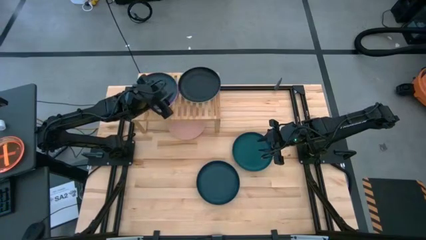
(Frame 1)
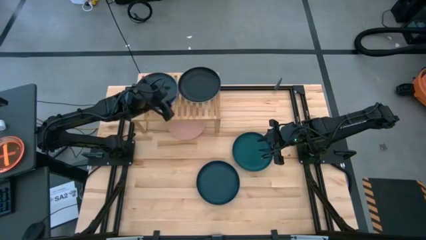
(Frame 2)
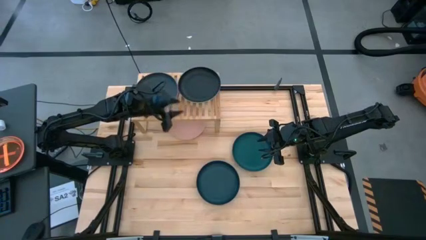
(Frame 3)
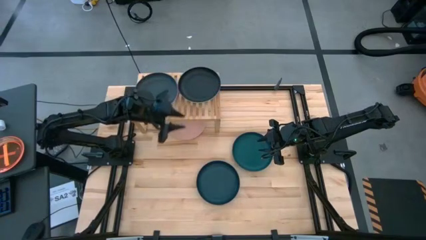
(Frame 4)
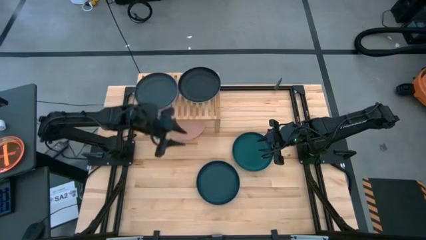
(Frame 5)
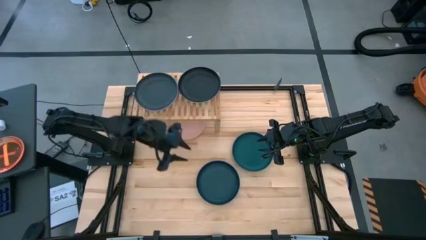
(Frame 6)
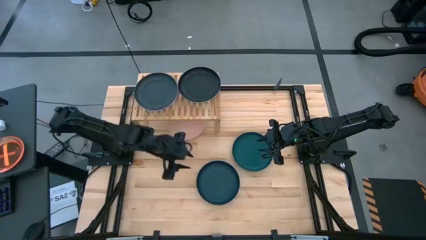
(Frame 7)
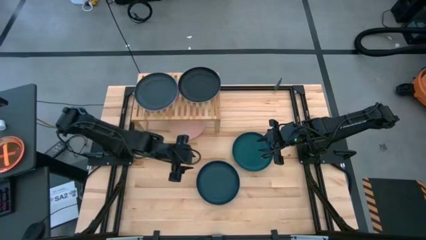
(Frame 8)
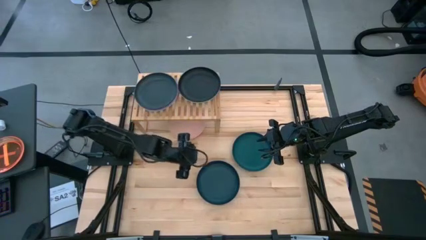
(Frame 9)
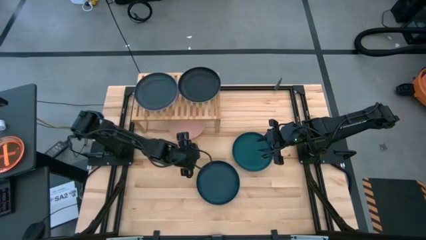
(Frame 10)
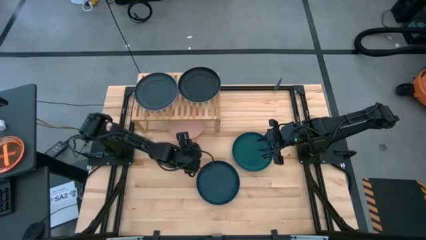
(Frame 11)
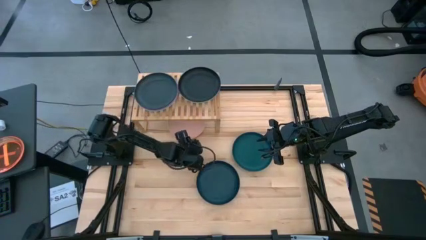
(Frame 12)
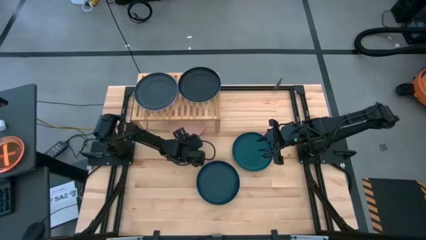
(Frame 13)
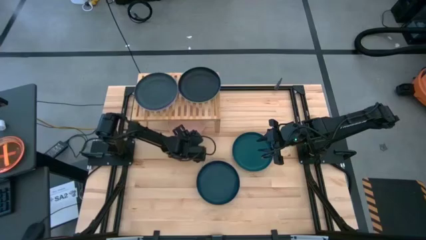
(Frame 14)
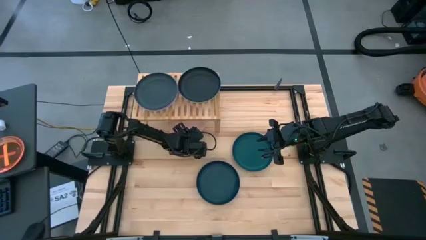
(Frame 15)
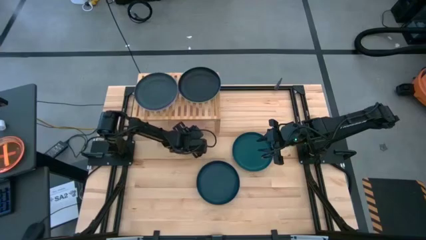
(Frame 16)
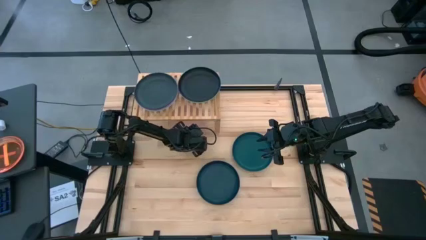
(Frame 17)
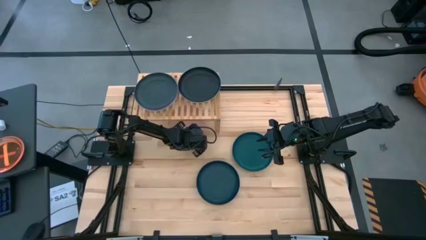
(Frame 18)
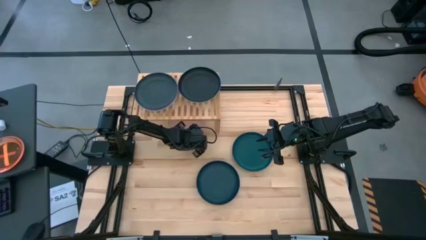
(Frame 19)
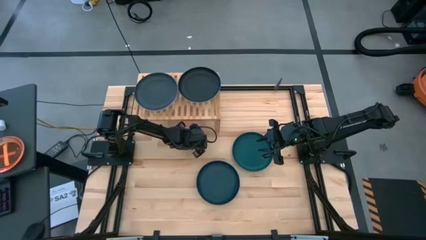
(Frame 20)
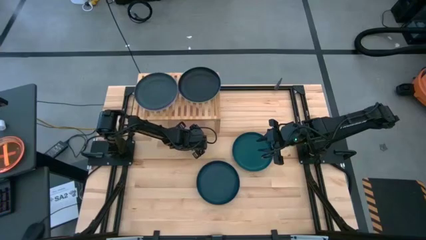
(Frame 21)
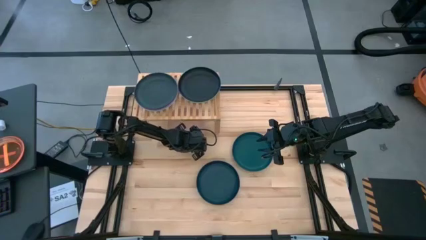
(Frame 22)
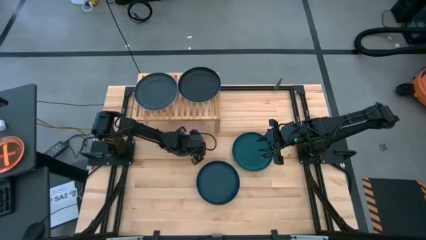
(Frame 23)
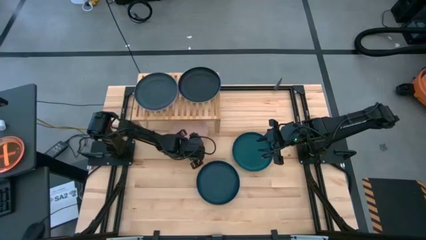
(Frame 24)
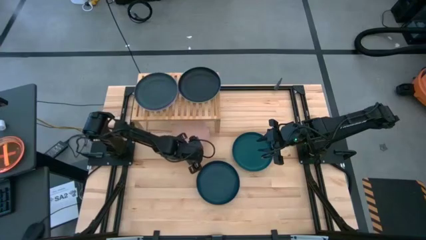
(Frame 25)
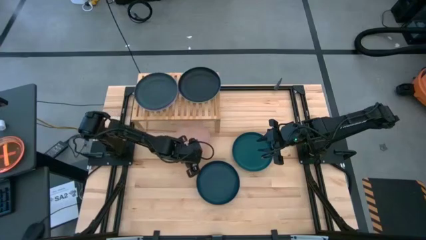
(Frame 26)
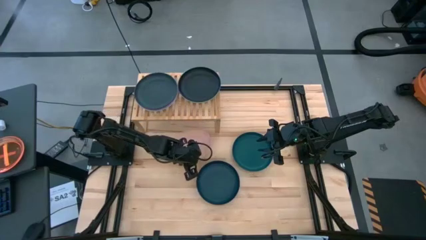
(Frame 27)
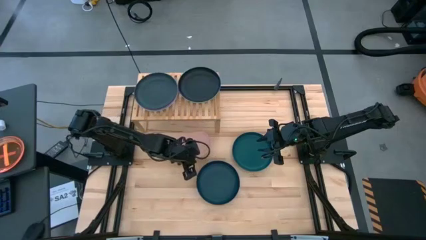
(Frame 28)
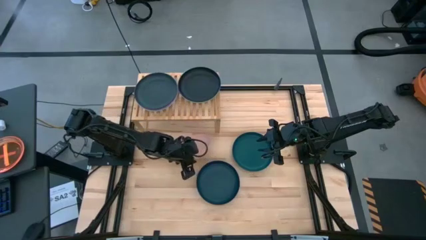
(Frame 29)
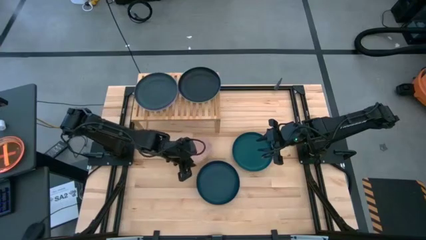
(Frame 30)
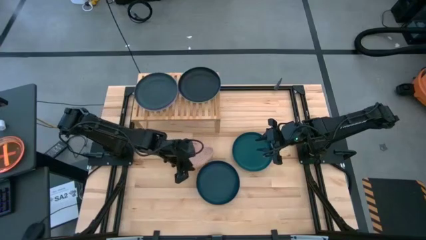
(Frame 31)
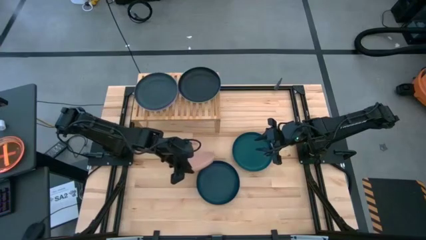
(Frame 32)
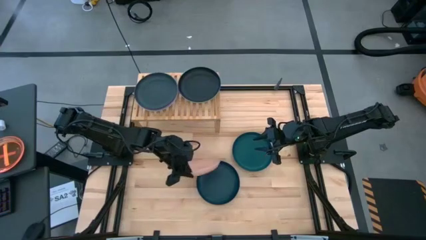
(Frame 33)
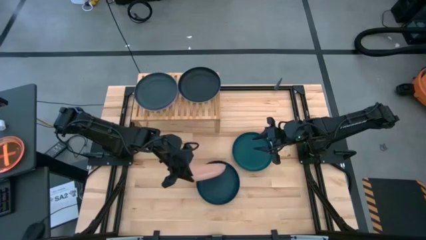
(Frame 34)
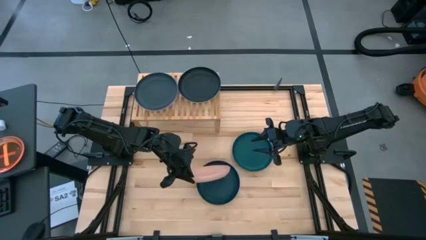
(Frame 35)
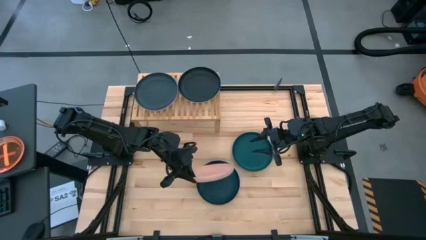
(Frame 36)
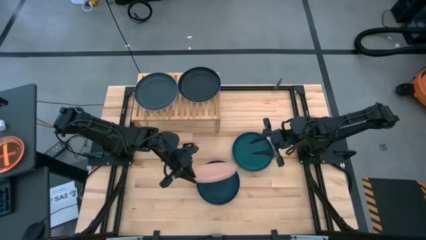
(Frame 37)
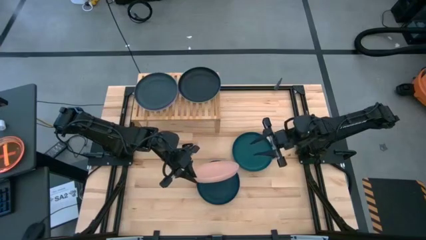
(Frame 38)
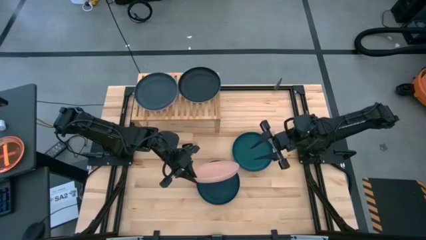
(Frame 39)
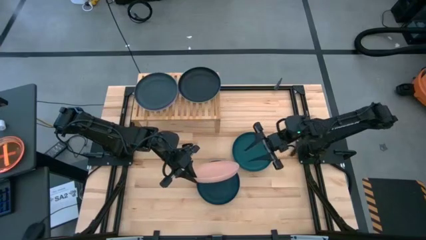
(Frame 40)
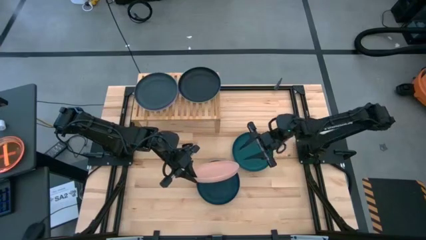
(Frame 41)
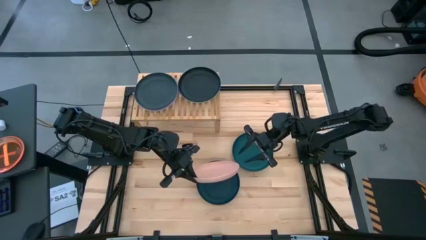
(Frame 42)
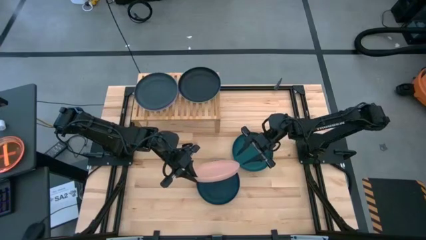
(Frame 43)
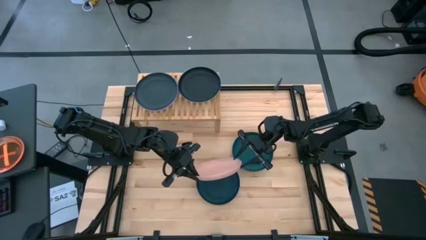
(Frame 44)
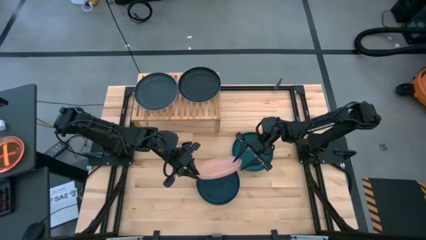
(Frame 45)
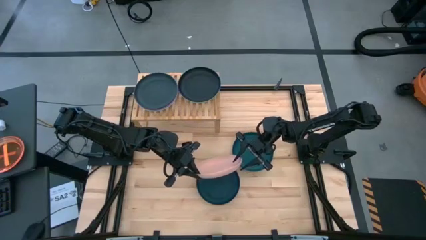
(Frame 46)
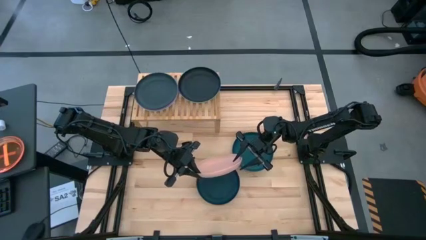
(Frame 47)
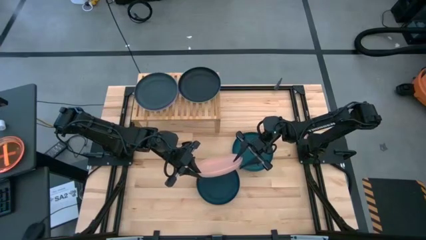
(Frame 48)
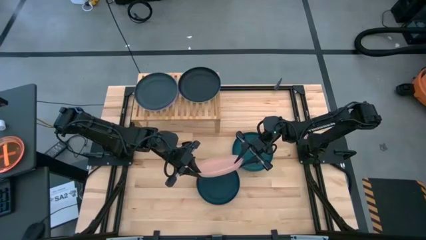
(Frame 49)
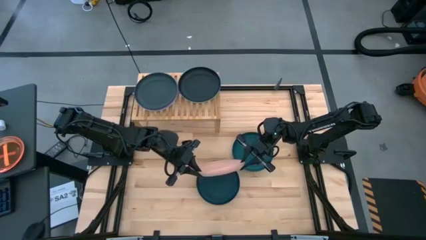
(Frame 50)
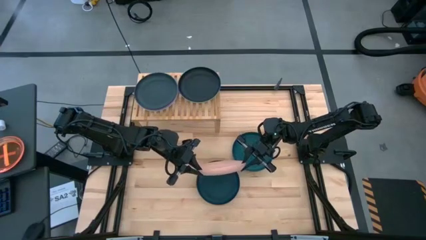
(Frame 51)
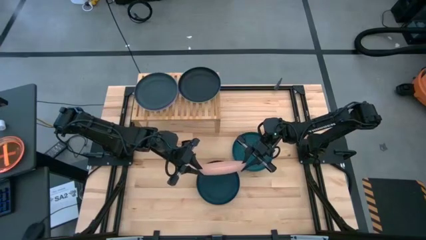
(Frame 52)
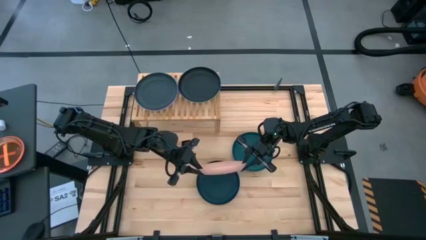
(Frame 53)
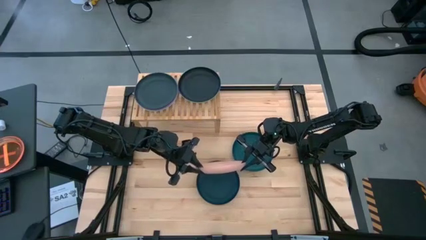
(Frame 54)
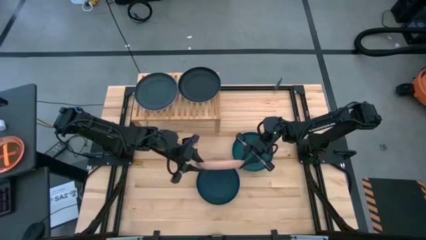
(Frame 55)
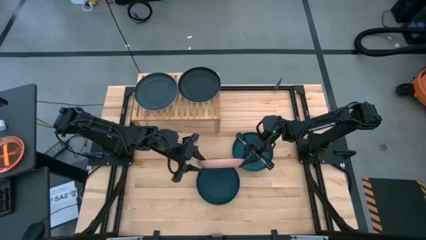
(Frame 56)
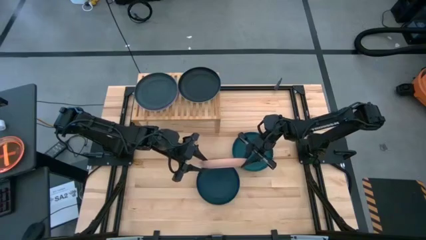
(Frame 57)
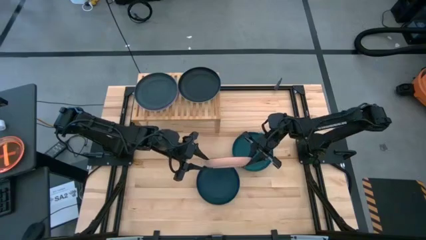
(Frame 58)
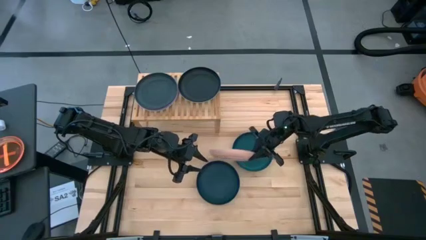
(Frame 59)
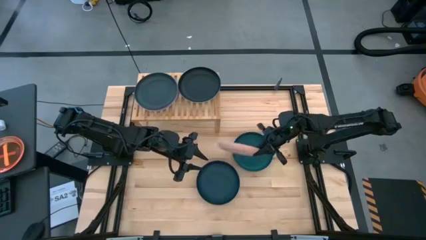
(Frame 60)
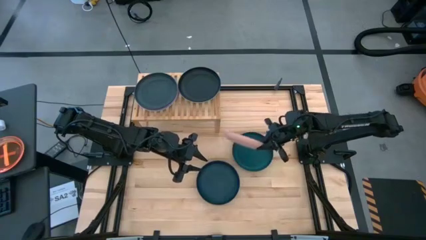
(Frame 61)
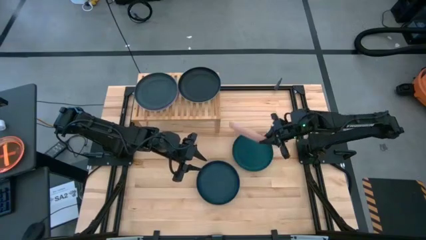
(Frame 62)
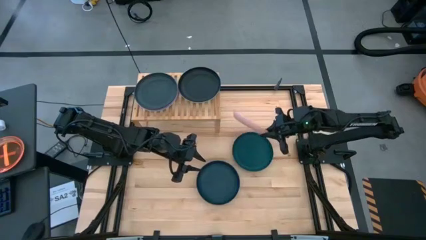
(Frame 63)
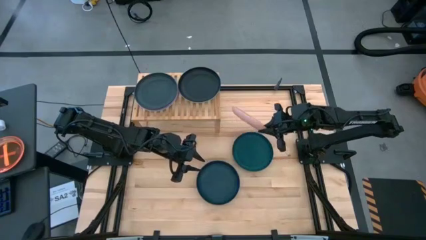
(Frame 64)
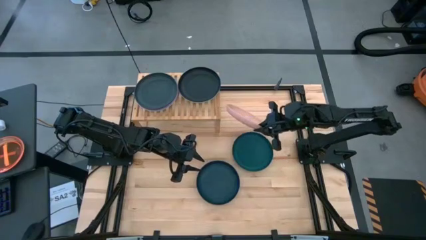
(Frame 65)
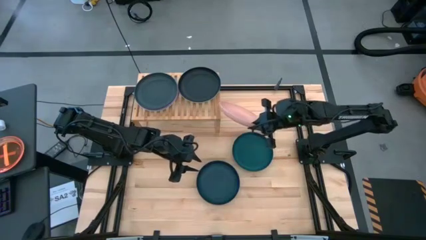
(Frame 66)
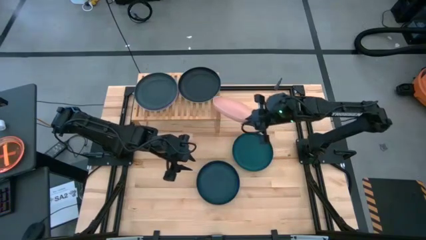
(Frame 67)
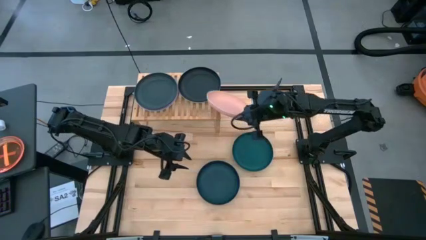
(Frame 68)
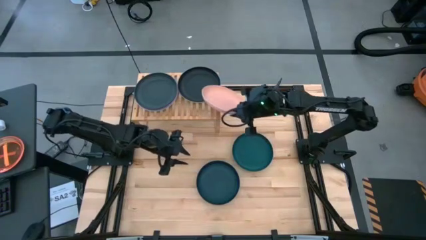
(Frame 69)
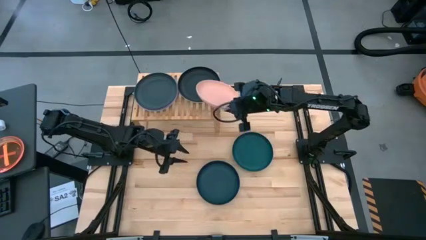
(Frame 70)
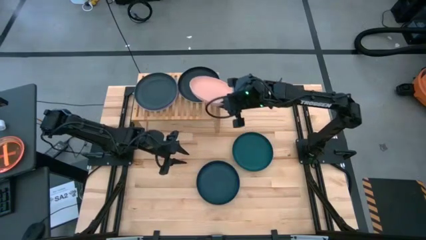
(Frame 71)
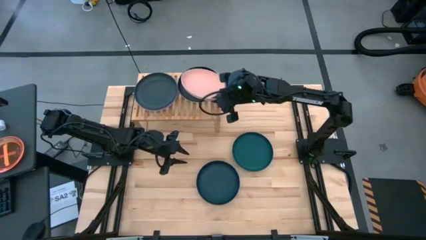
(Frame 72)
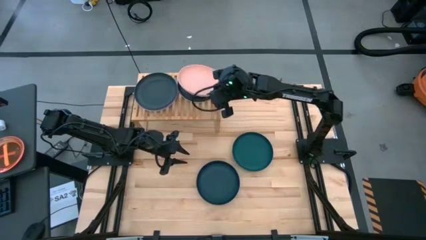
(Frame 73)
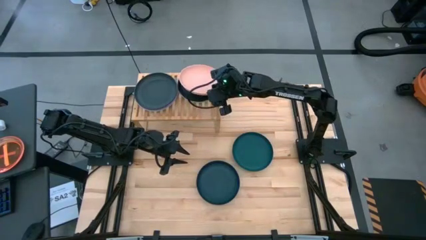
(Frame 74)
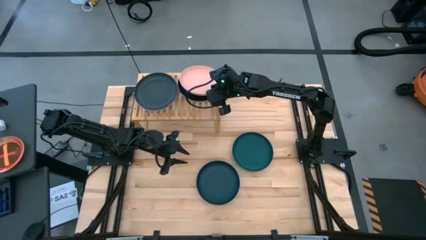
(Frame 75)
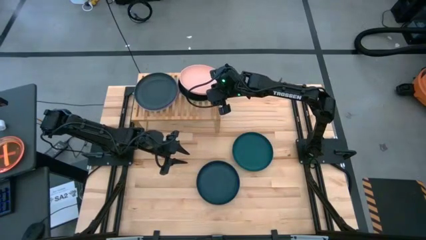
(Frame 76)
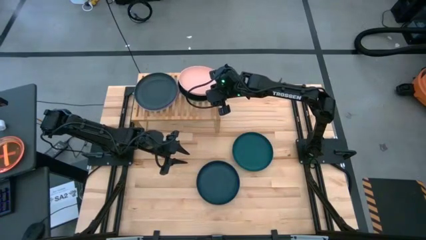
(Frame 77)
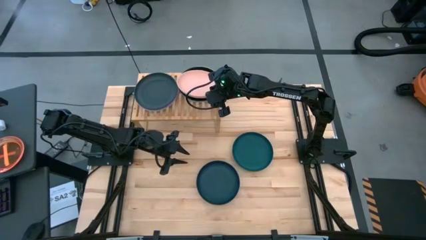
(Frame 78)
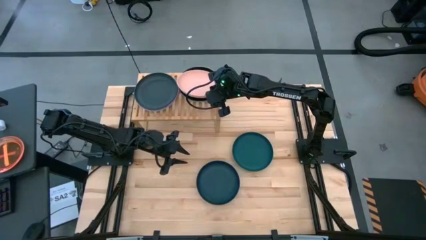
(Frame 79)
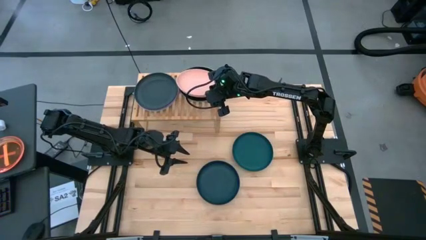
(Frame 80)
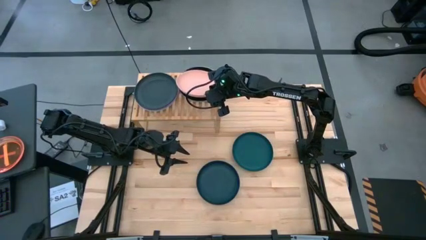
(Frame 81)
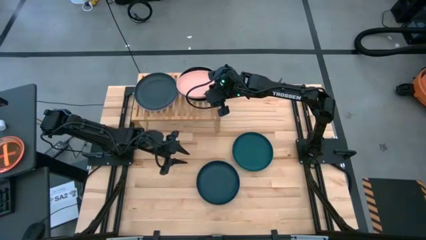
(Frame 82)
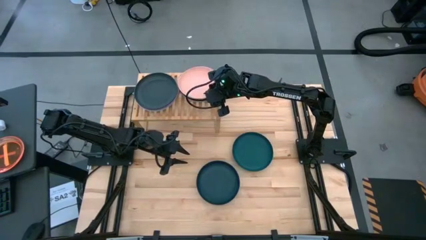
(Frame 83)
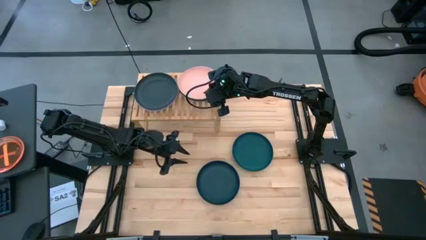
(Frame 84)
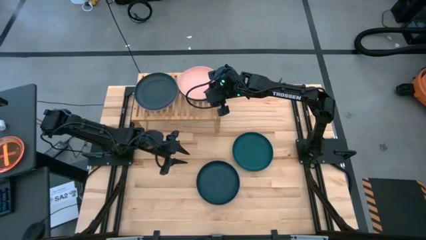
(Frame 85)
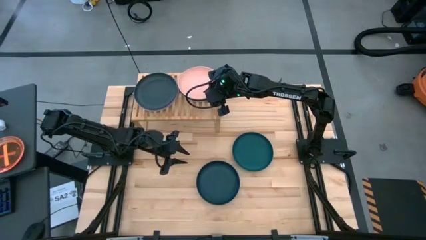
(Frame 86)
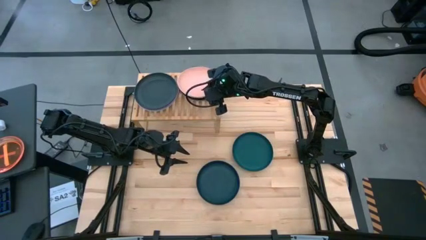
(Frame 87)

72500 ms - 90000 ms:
Task: Place and stack plates onto a shelf
Stack the light pink plate on the top of the other black plate on the shelf
